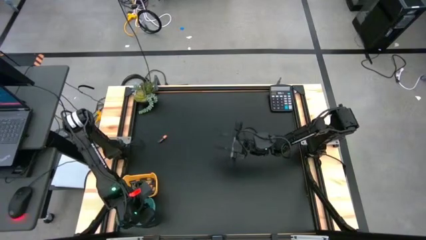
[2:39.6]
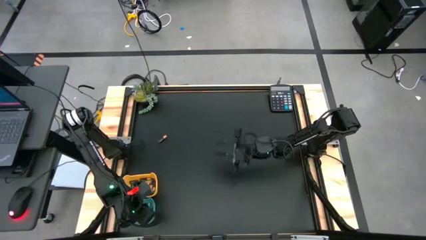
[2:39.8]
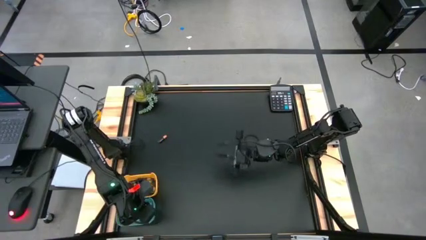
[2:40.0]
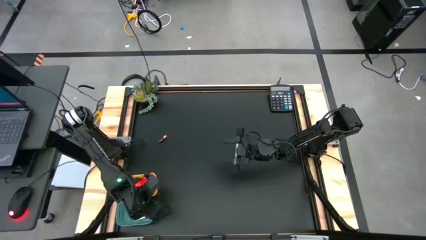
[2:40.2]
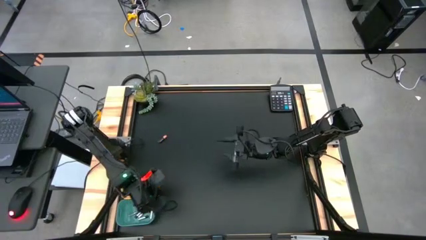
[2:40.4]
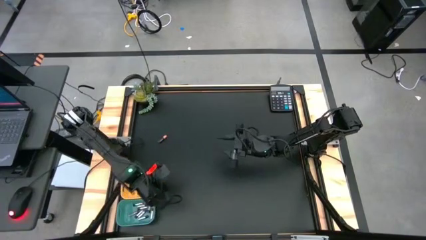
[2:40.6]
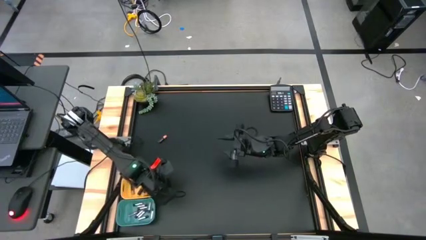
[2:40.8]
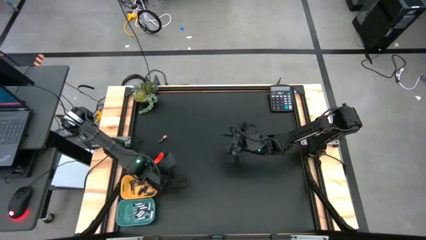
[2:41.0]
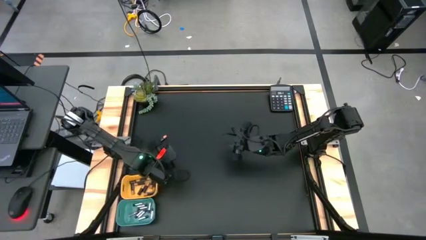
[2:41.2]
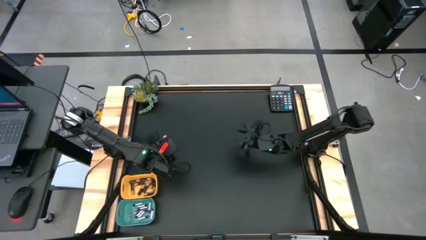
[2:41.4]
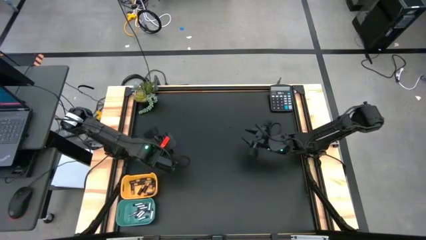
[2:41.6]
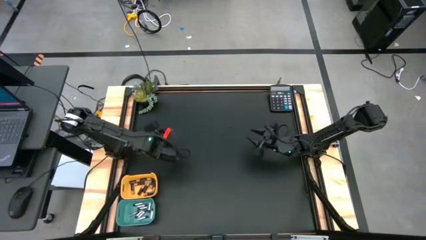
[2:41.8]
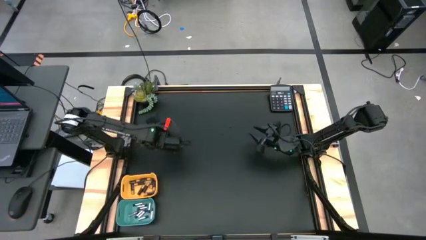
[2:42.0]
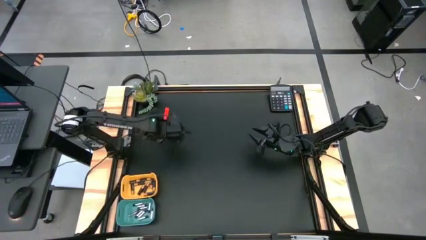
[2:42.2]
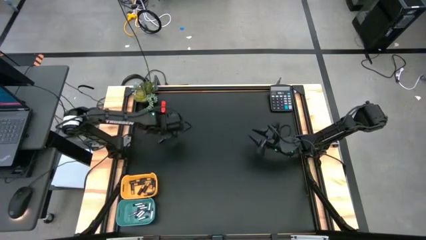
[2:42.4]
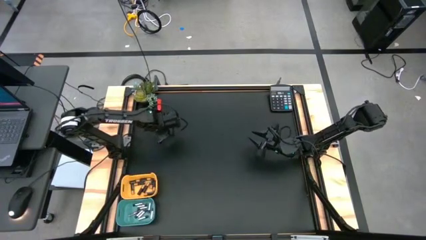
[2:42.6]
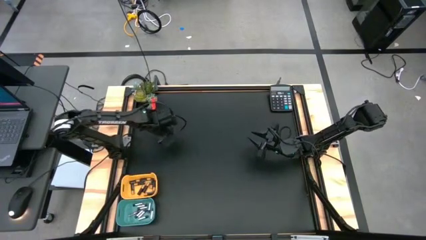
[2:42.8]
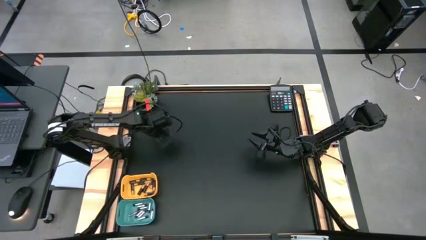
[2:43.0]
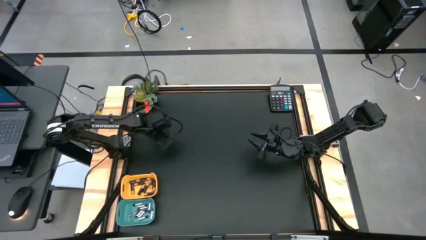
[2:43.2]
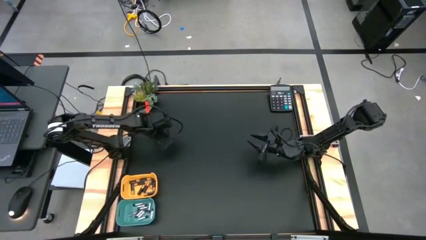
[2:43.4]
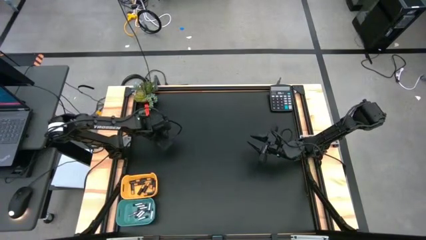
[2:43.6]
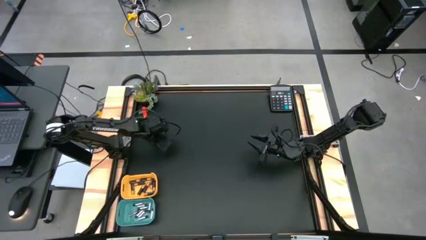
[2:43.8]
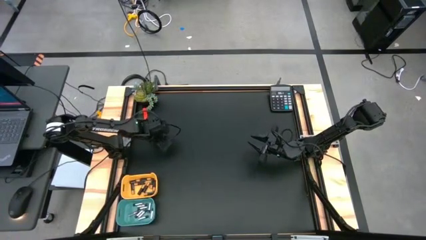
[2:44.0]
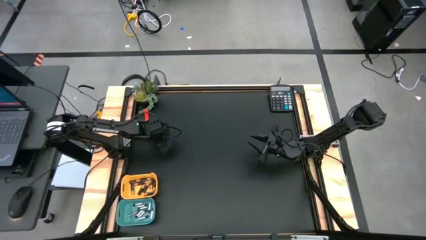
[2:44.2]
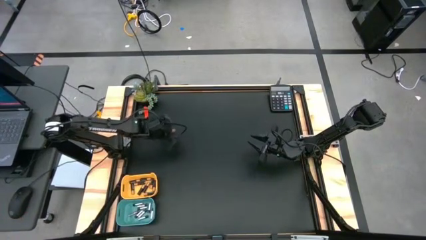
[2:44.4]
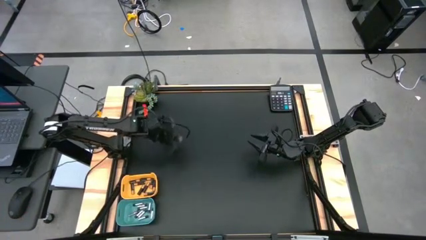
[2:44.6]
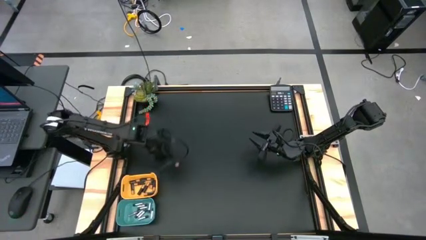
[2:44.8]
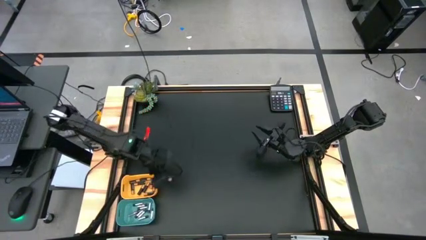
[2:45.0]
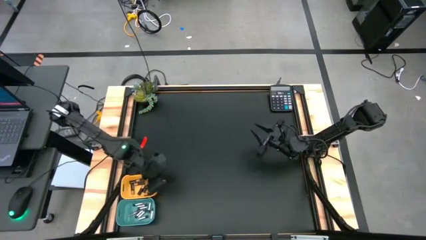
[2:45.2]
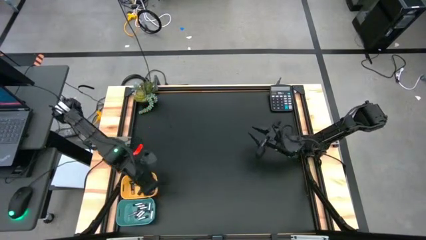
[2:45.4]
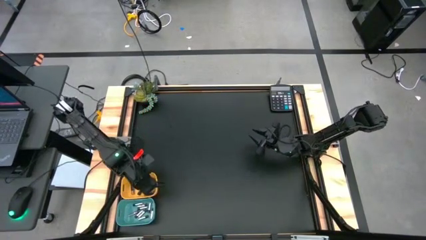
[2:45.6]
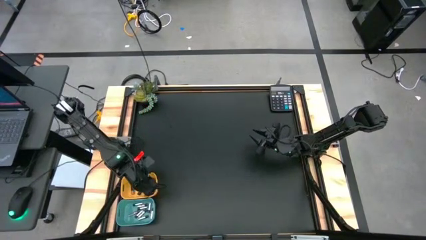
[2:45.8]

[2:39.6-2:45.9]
Task: Sort batteries
Put the black battery into the yellow bin

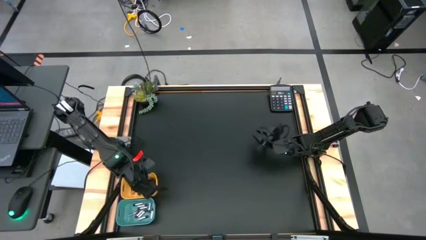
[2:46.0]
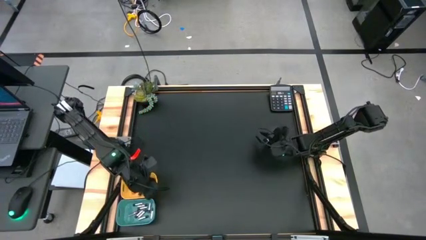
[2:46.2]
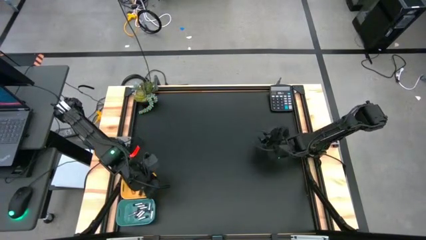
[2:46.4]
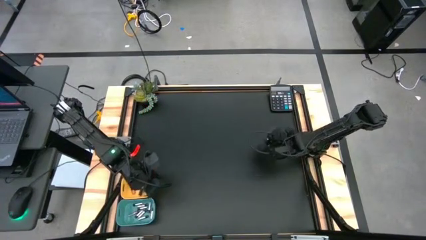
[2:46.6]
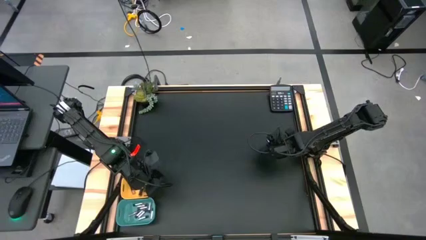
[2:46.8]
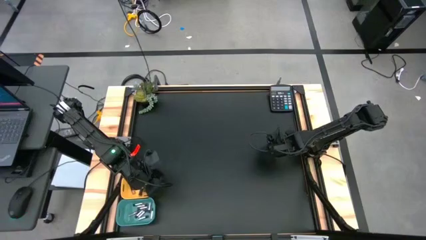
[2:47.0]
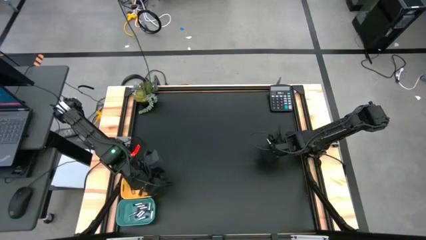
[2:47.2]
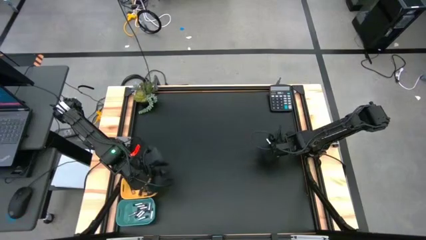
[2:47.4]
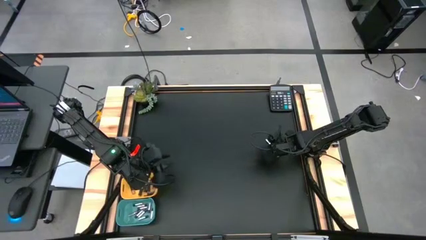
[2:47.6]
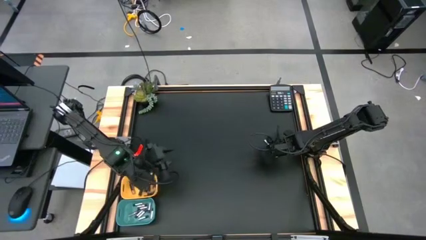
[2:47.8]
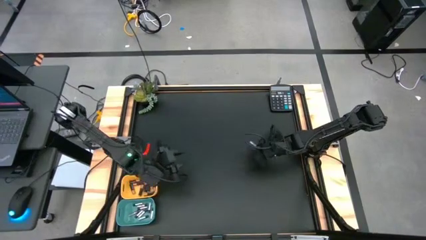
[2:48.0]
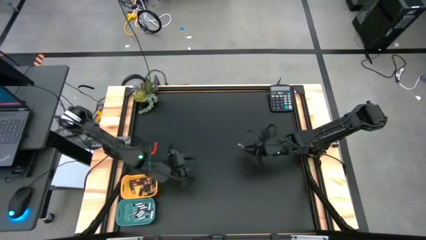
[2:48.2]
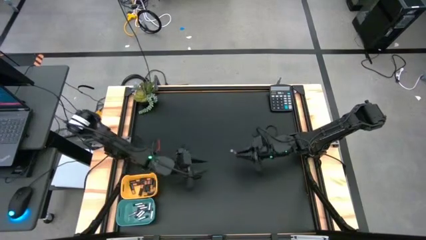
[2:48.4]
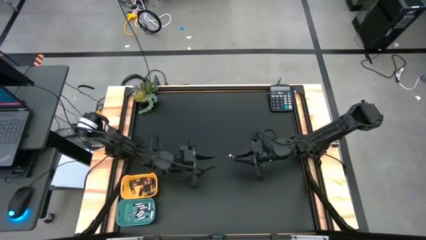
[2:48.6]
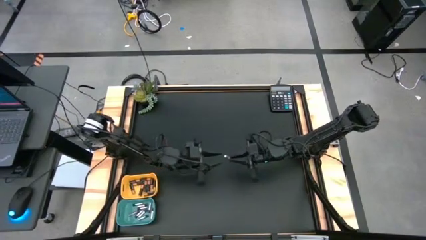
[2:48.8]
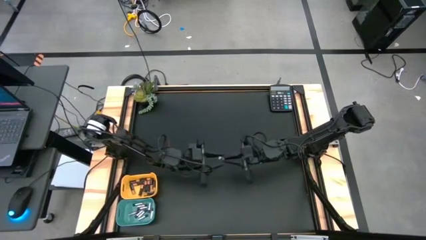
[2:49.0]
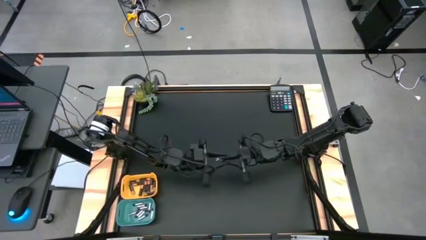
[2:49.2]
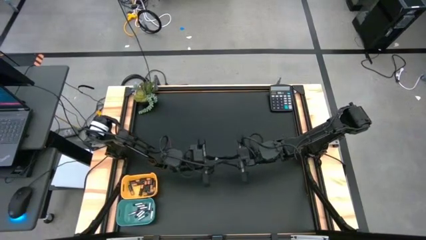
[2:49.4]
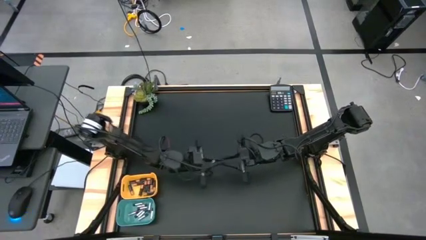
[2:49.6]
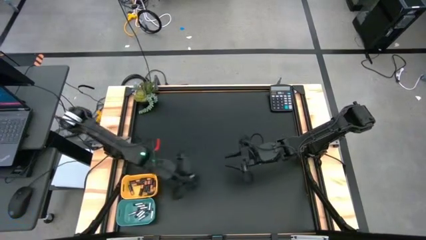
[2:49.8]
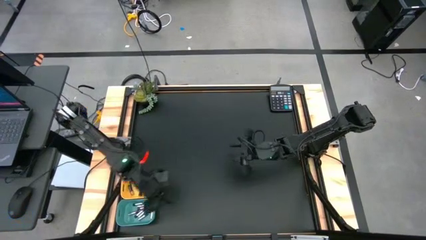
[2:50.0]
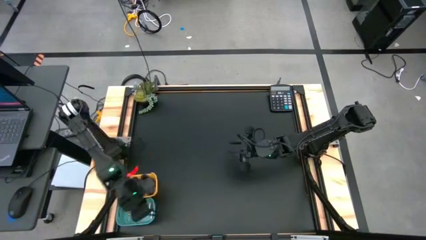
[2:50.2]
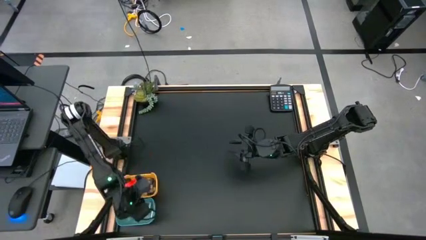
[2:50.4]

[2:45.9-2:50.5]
Put the silver battery into the green bin

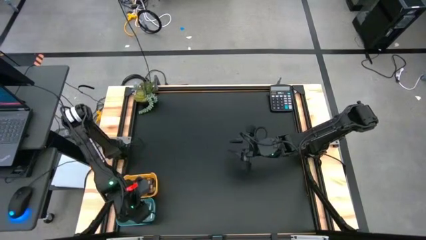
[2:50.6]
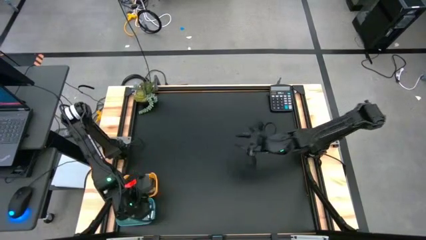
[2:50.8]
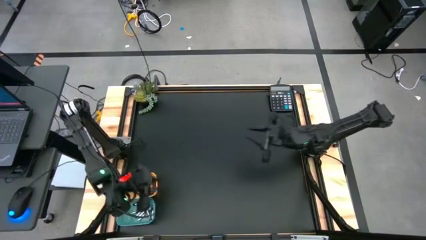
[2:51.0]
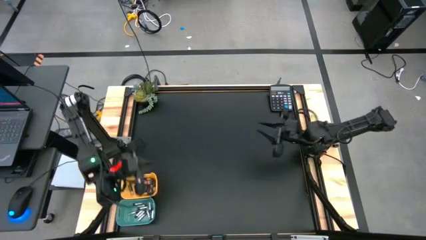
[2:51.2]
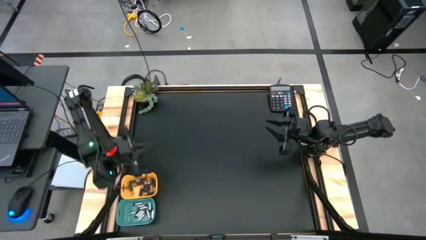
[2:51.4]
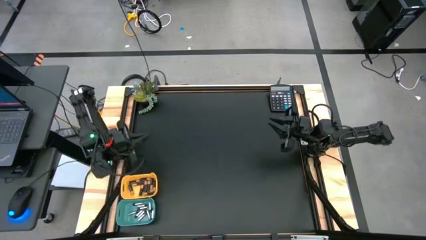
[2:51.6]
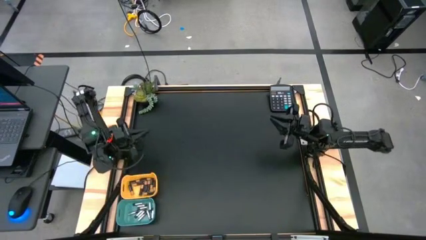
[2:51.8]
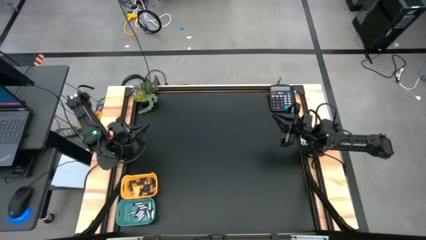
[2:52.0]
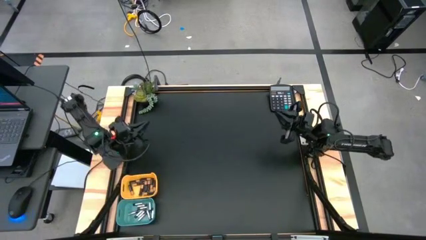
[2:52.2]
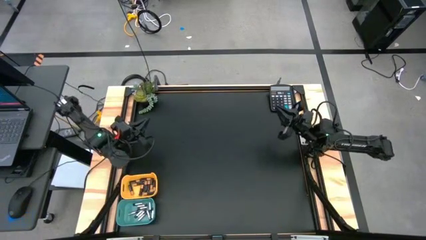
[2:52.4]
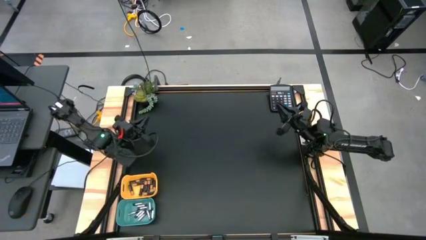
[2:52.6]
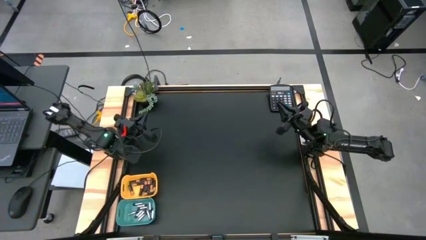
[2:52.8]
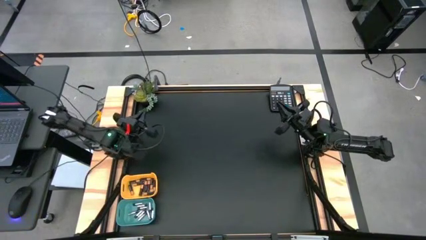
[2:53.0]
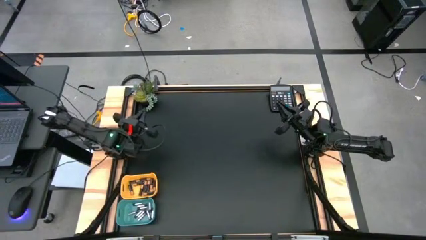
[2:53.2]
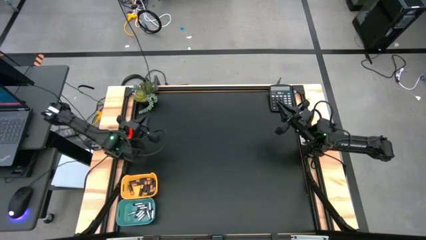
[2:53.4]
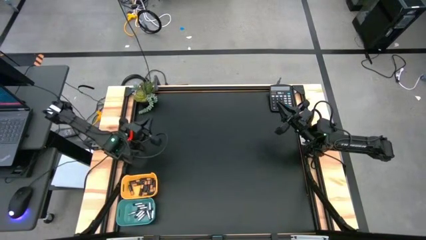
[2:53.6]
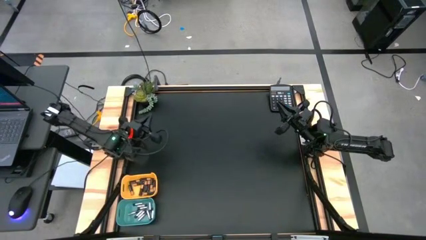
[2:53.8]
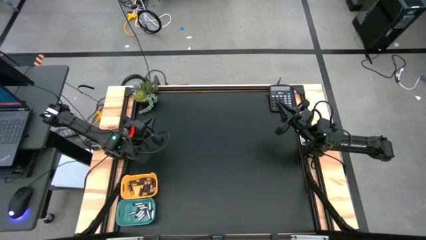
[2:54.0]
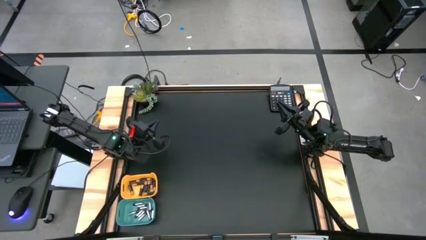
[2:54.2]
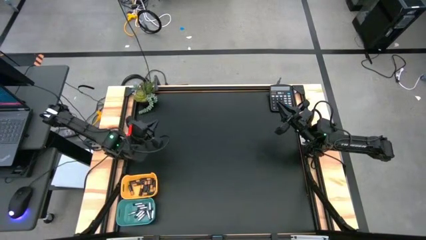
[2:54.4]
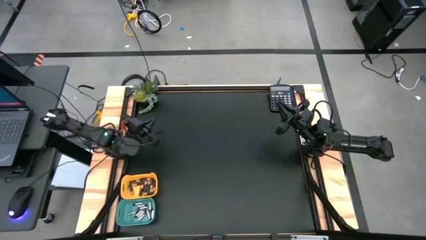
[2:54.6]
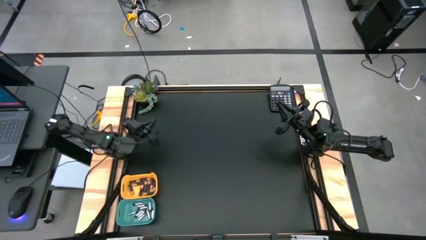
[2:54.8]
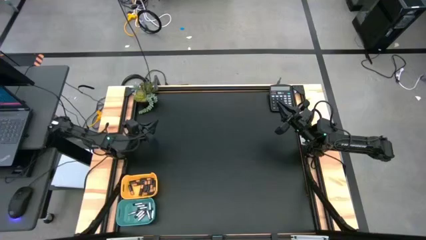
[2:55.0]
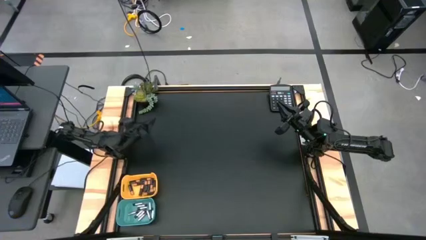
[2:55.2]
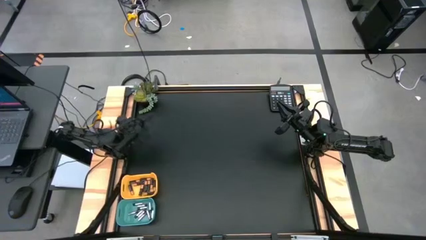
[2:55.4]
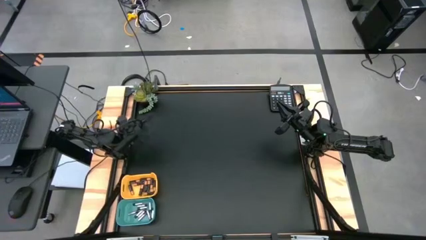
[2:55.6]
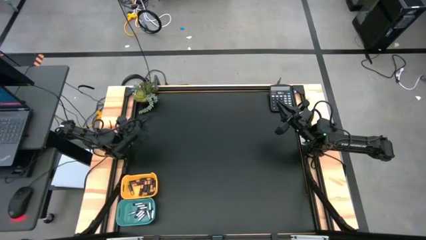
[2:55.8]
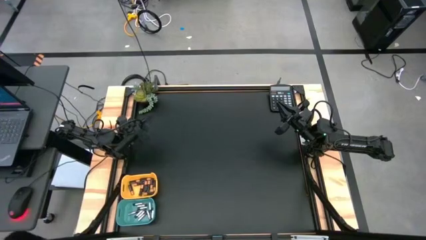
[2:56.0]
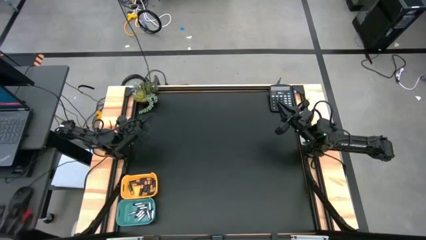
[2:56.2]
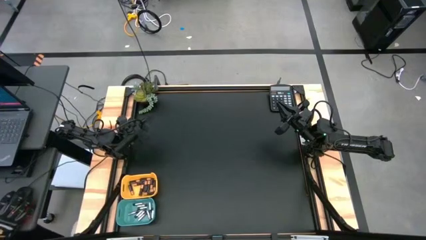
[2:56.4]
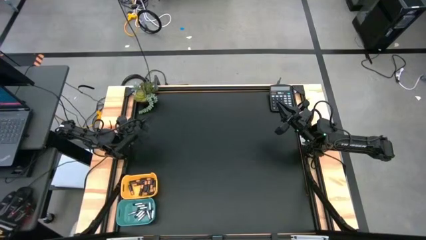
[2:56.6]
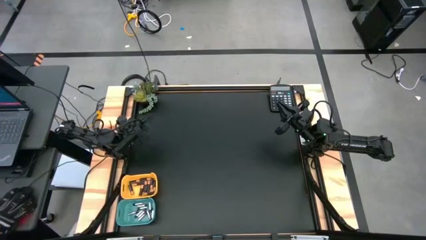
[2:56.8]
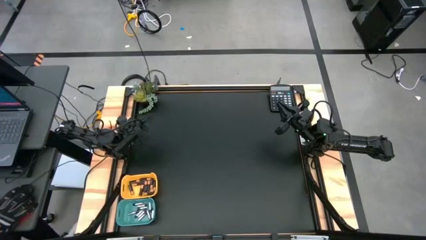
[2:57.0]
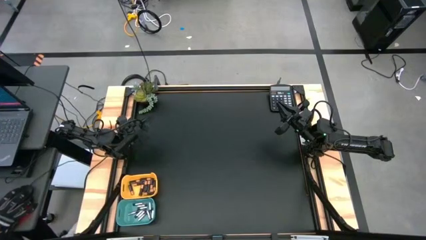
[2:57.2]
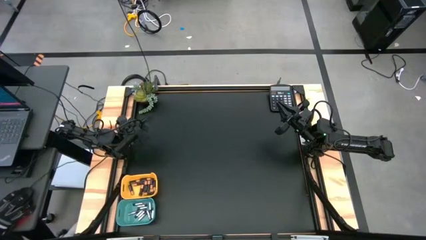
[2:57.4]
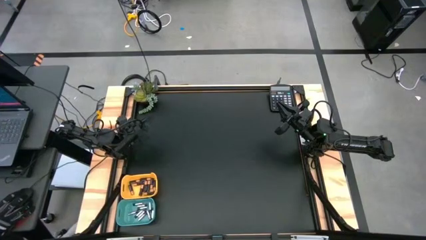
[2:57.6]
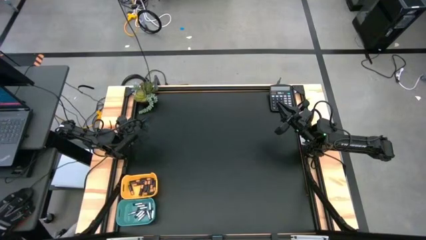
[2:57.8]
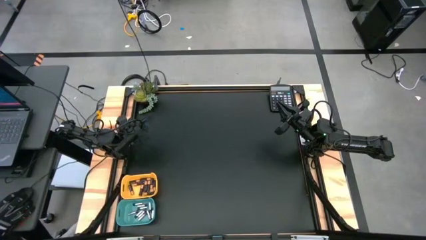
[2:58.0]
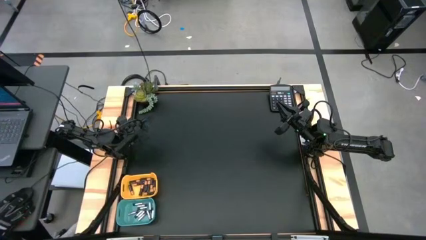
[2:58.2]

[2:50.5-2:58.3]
Return to Home Position
